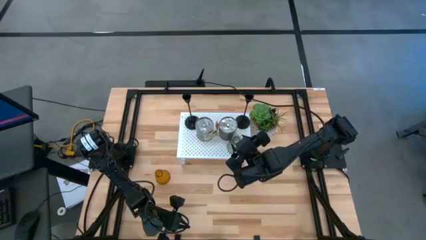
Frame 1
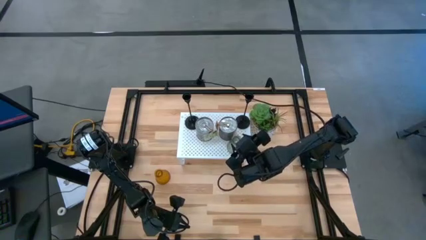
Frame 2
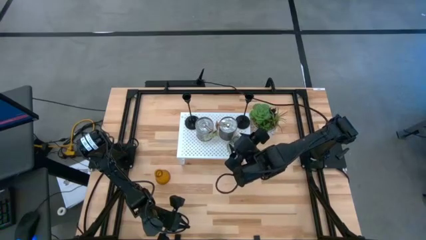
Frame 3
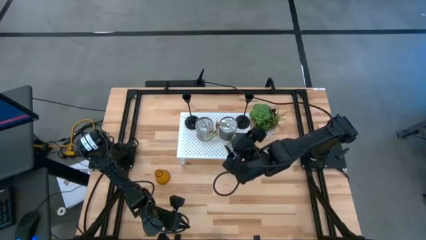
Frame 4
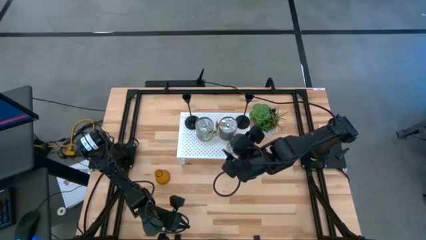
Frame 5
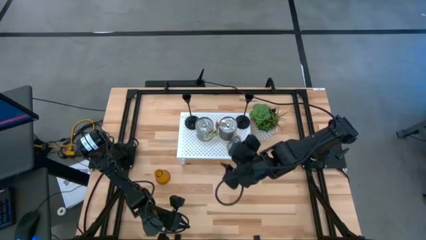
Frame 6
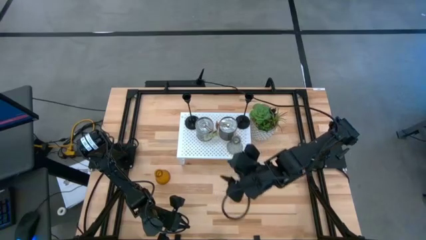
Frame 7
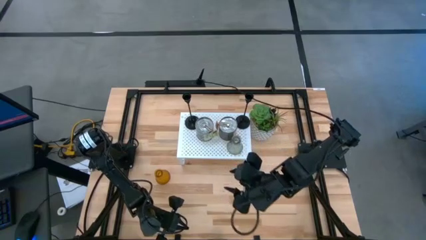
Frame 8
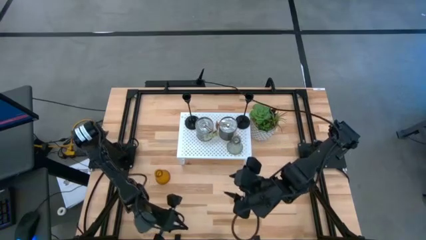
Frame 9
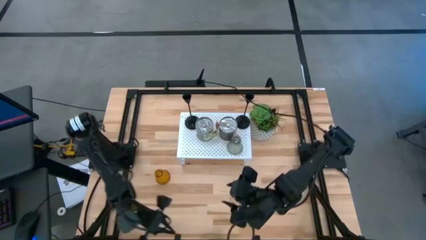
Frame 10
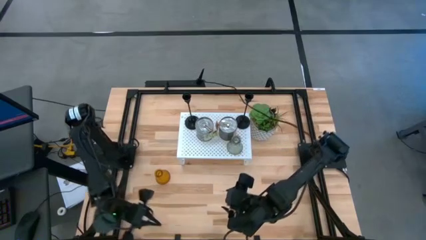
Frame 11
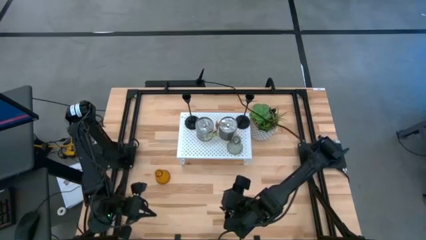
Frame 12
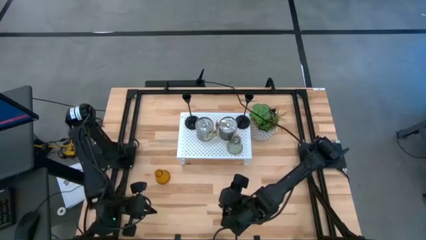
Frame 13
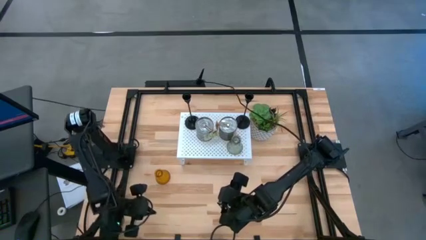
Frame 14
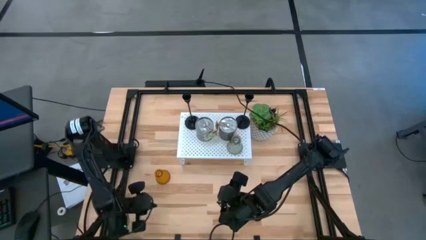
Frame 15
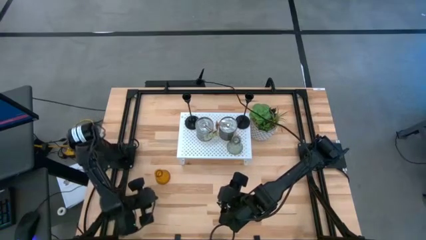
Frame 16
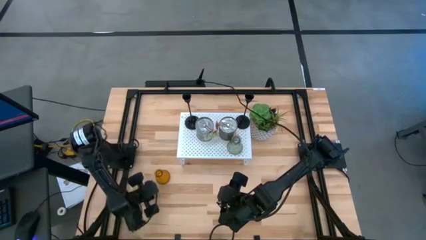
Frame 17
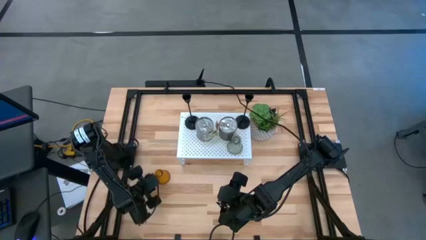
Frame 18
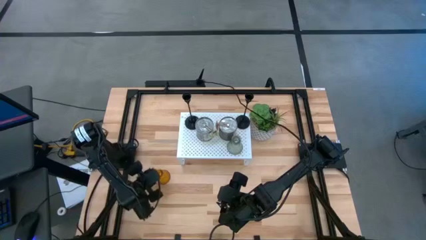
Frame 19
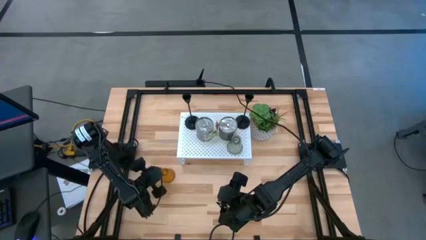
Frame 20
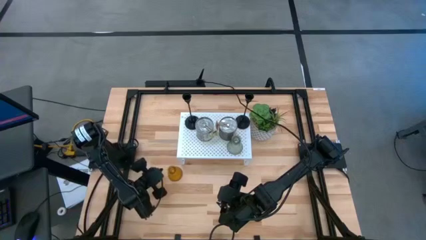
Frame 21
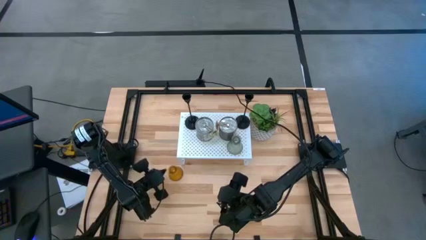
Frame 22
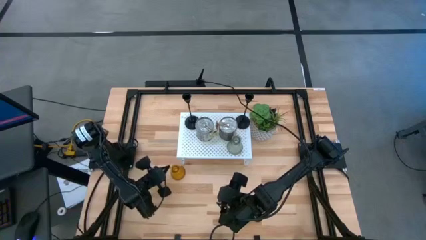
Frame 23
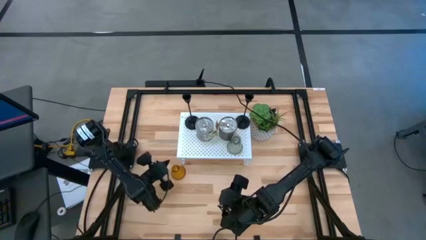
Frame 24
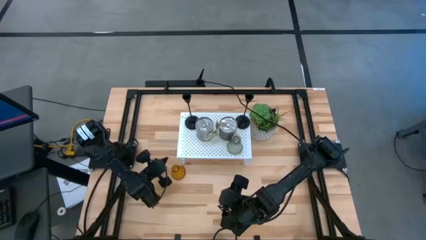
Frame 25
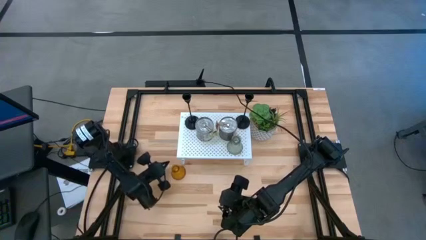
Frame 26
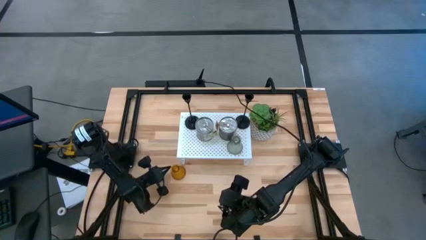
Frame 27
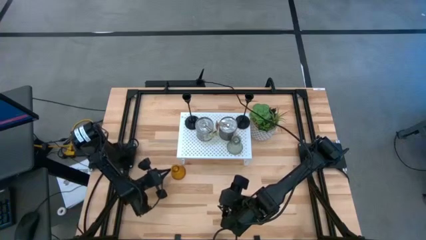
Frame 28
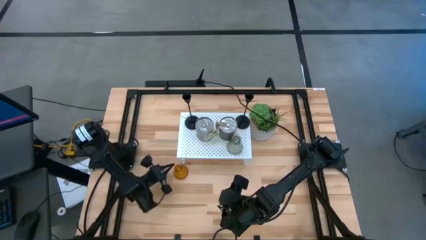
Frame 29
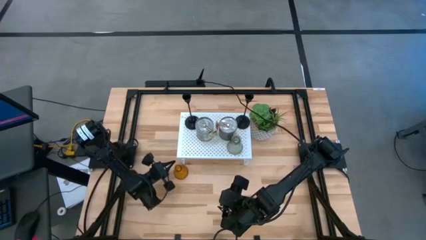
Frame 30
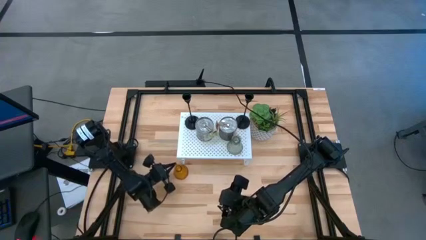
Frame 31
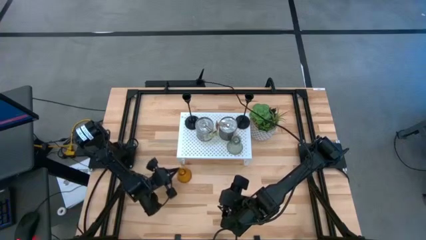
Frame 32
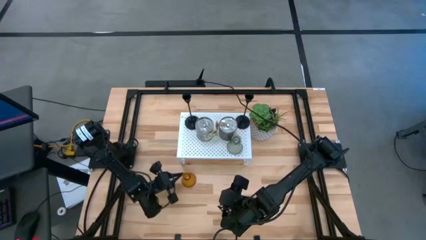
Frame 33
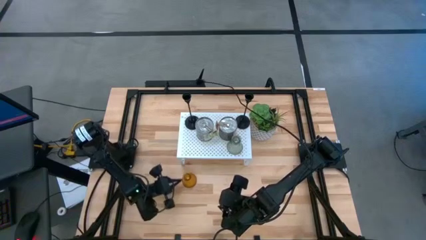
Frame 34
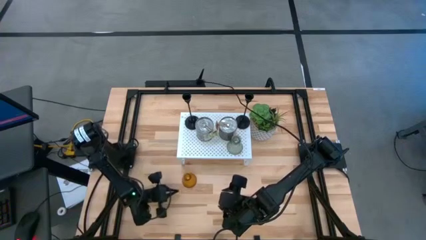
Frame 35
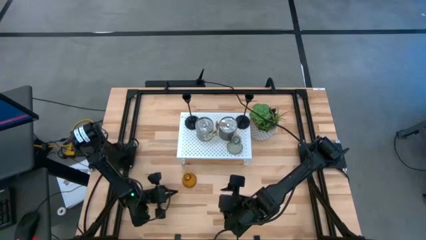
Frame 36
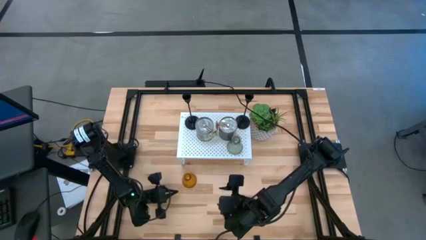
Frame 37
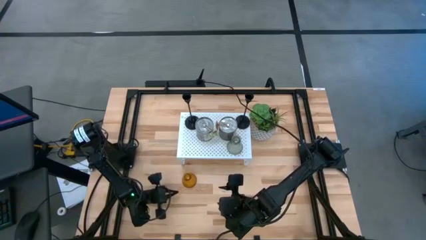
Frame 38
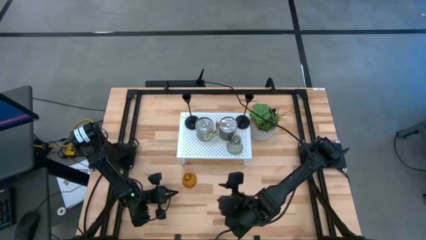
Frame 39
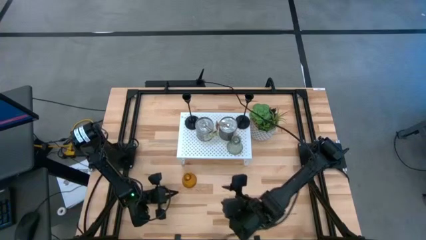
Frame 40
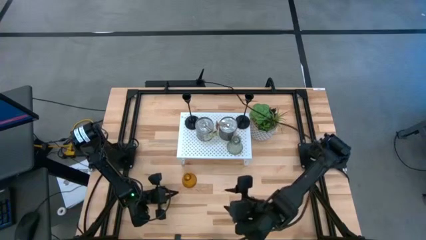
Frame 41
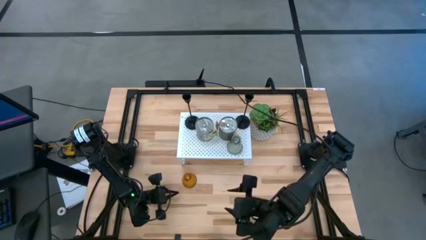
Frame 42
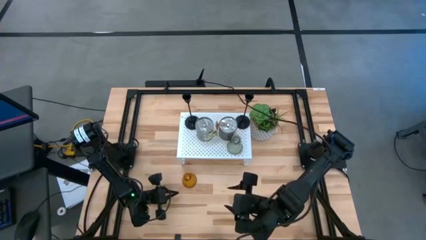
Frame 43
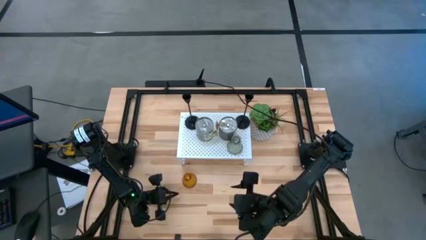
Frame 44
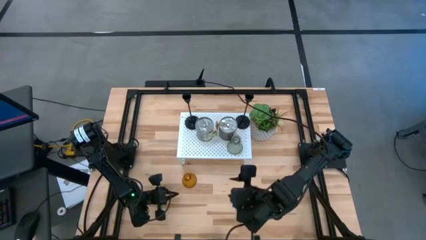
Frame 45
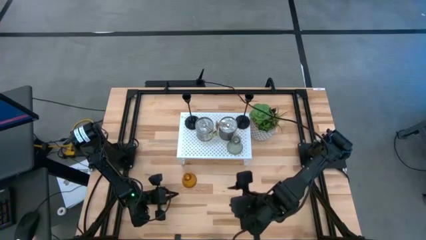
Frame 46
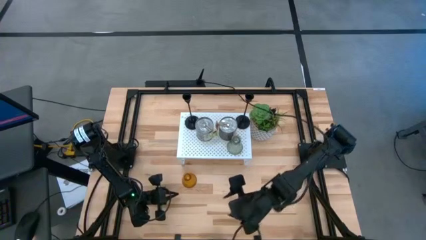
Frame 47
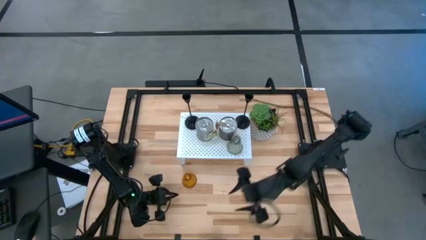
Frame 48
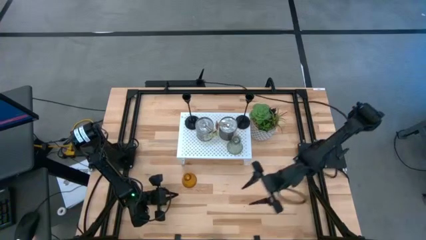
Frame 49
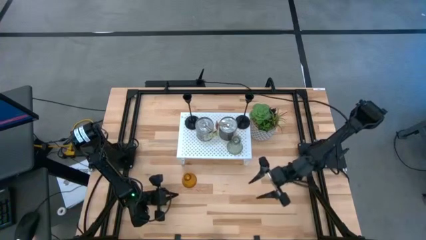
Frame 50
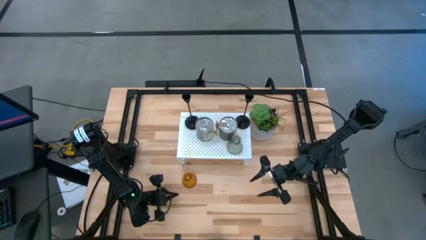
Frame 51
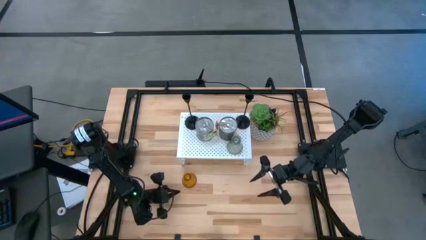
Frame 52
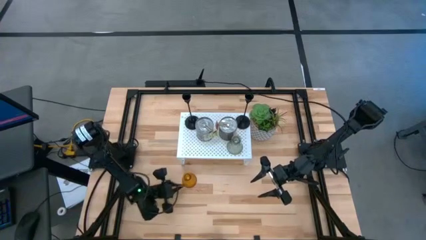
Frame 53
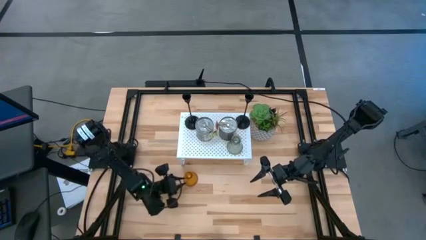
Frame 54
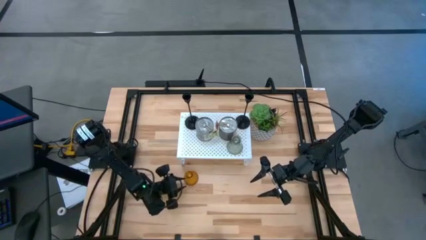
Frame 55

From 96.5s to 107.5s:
Task: Pick & Place candle stick holders
Put the yellow candle holder on the shelf
